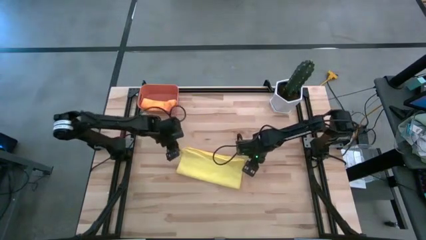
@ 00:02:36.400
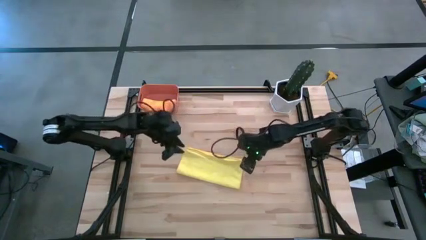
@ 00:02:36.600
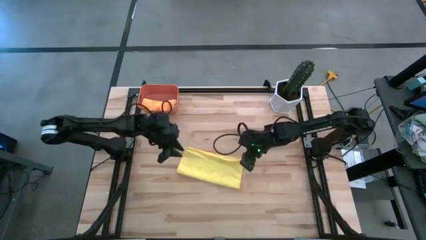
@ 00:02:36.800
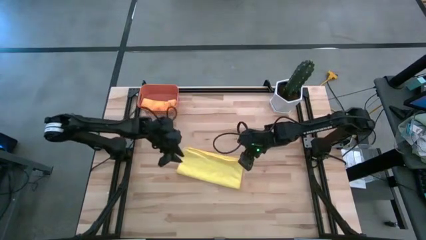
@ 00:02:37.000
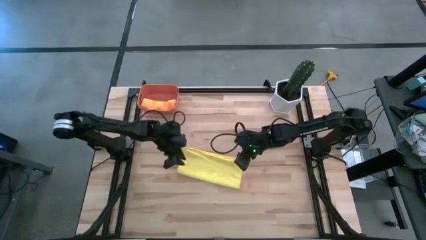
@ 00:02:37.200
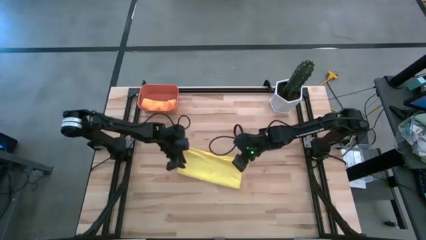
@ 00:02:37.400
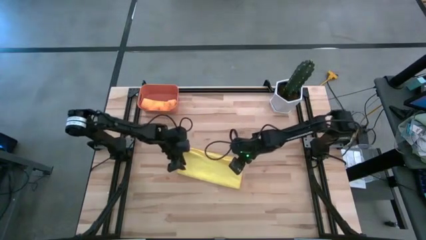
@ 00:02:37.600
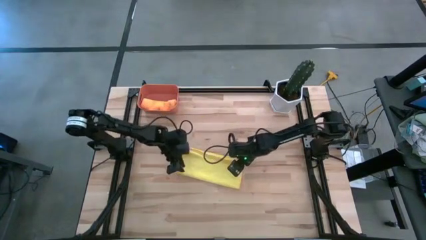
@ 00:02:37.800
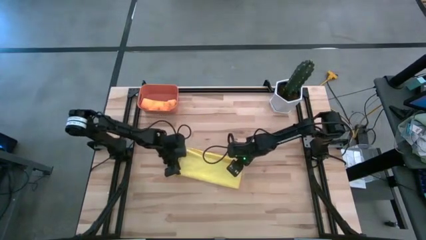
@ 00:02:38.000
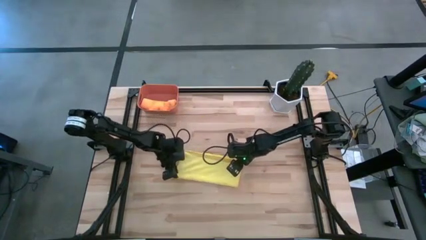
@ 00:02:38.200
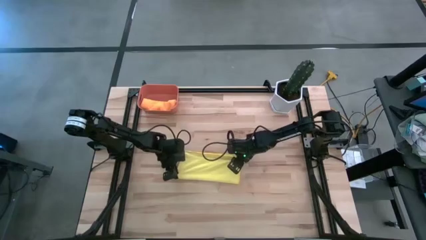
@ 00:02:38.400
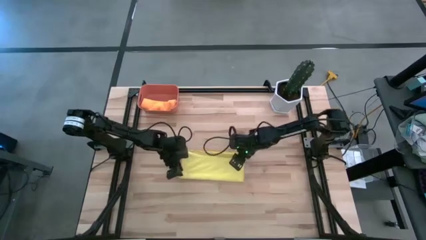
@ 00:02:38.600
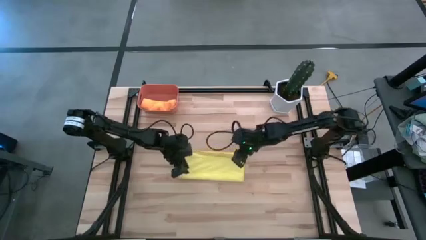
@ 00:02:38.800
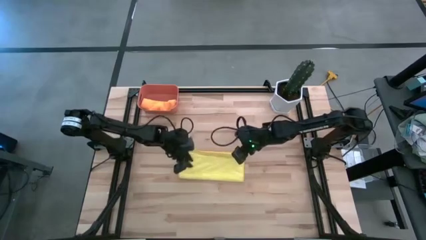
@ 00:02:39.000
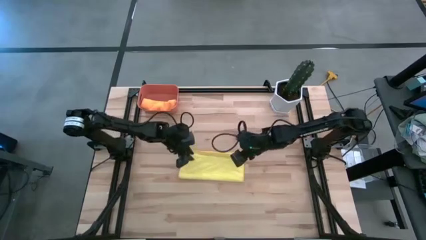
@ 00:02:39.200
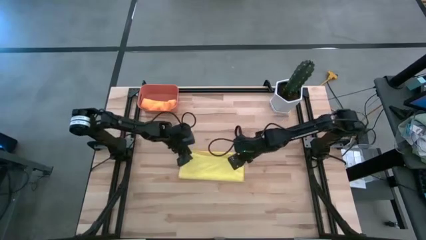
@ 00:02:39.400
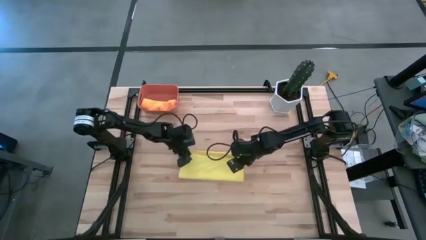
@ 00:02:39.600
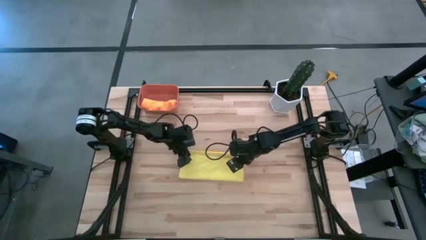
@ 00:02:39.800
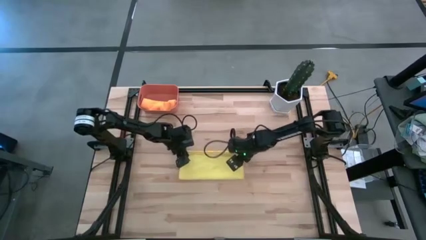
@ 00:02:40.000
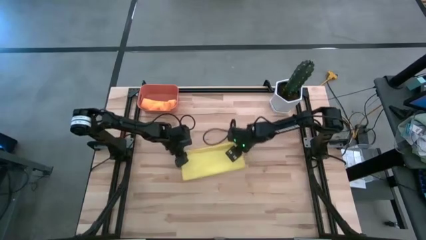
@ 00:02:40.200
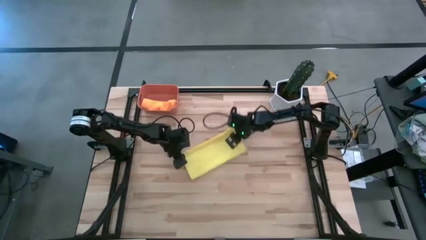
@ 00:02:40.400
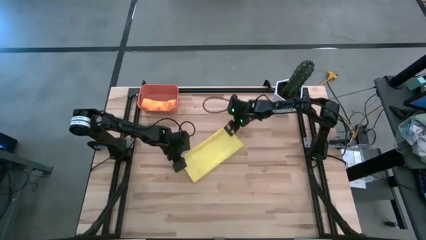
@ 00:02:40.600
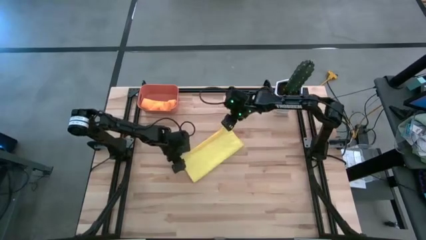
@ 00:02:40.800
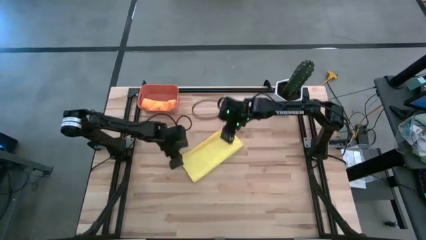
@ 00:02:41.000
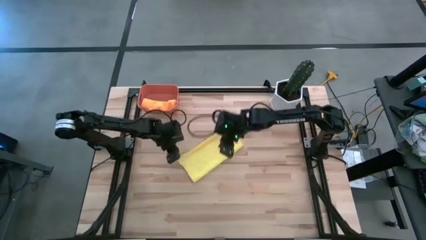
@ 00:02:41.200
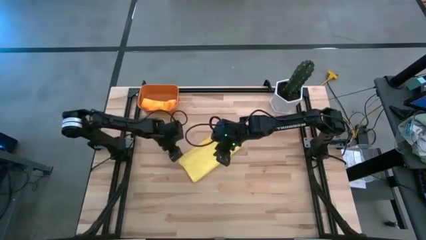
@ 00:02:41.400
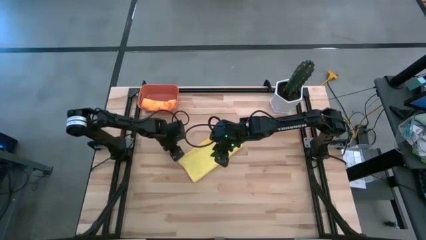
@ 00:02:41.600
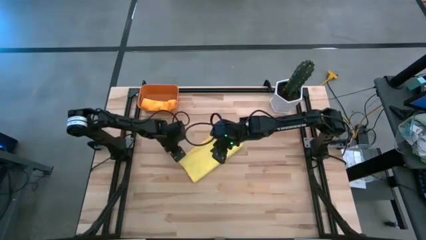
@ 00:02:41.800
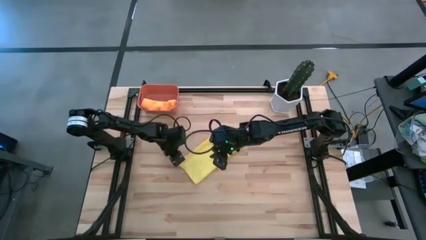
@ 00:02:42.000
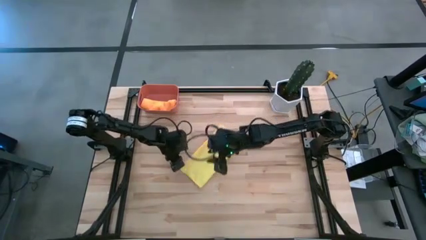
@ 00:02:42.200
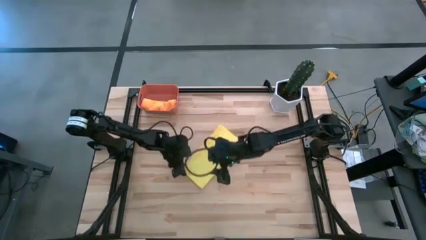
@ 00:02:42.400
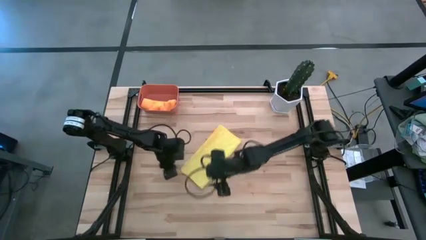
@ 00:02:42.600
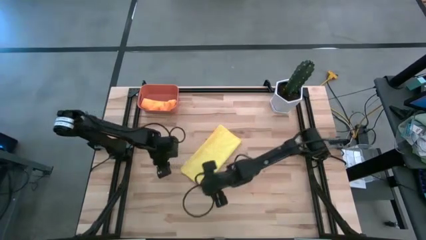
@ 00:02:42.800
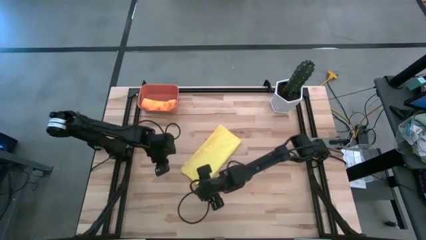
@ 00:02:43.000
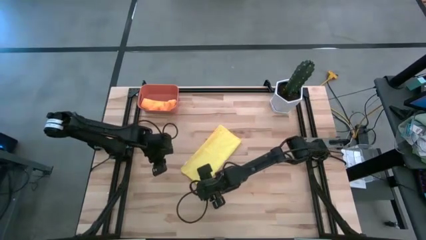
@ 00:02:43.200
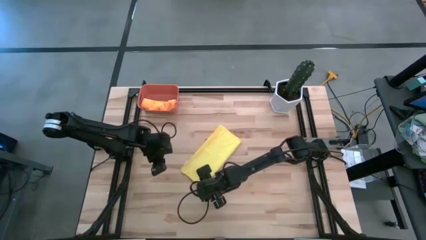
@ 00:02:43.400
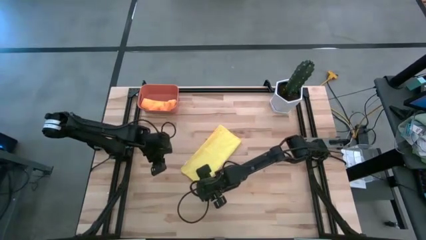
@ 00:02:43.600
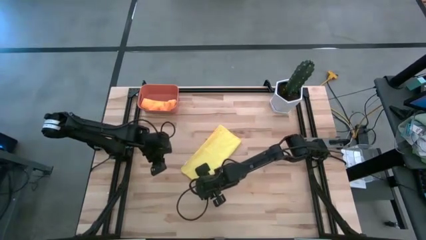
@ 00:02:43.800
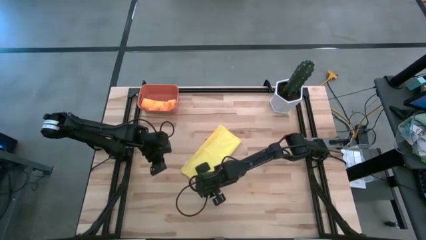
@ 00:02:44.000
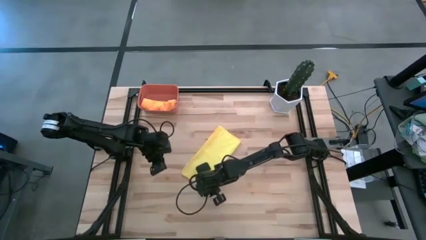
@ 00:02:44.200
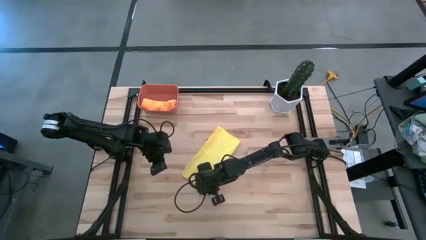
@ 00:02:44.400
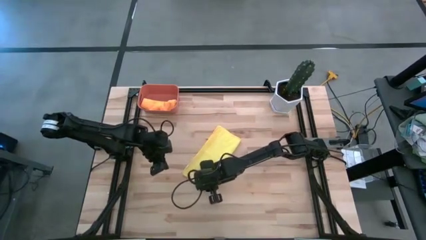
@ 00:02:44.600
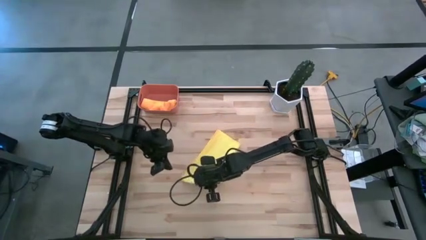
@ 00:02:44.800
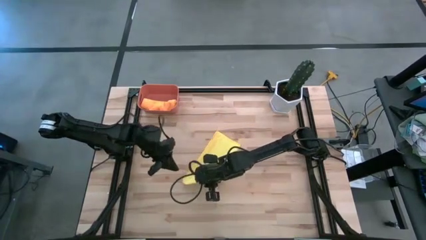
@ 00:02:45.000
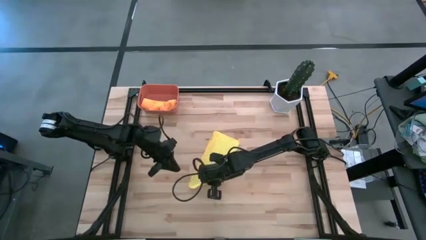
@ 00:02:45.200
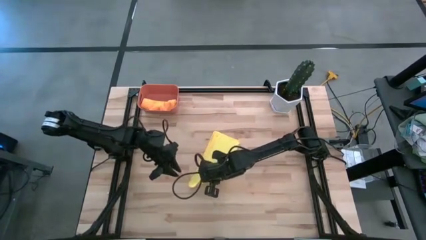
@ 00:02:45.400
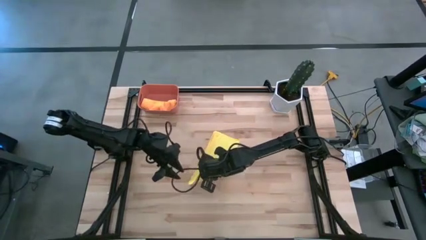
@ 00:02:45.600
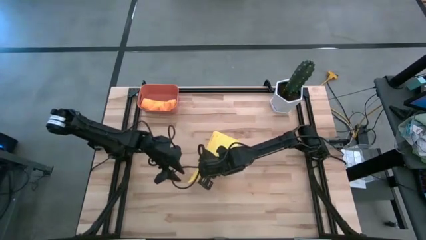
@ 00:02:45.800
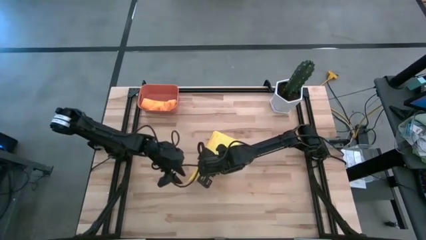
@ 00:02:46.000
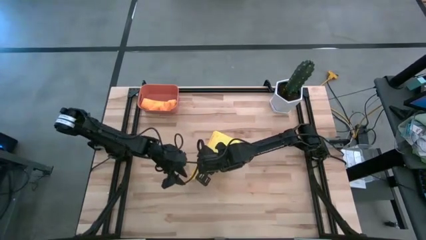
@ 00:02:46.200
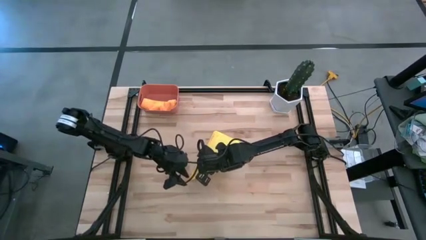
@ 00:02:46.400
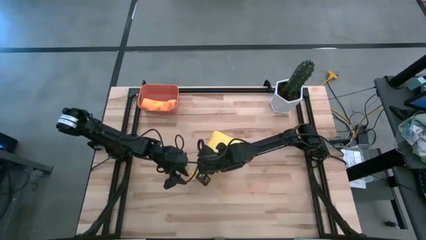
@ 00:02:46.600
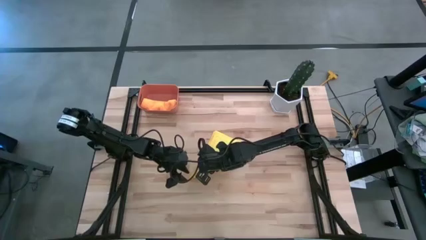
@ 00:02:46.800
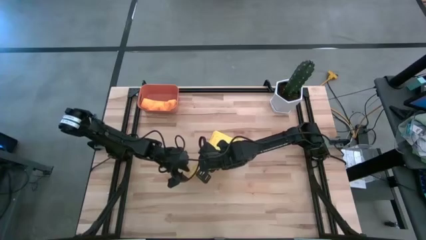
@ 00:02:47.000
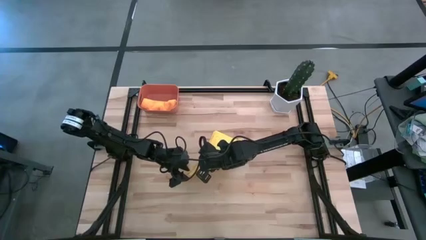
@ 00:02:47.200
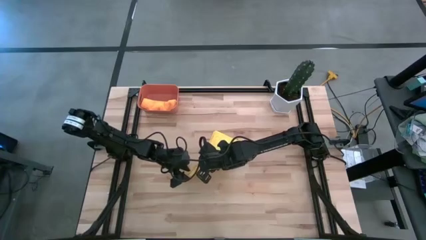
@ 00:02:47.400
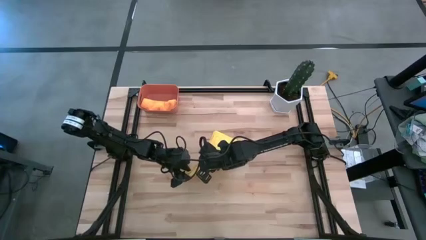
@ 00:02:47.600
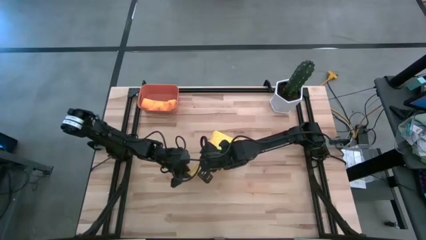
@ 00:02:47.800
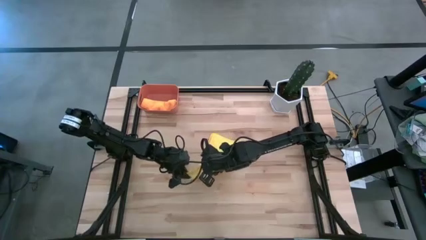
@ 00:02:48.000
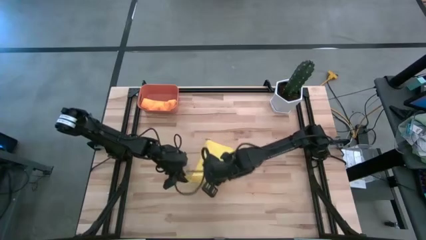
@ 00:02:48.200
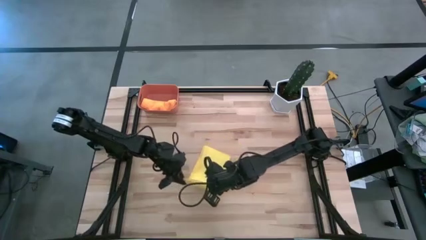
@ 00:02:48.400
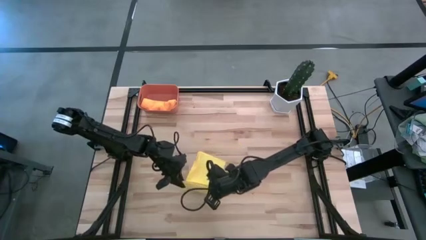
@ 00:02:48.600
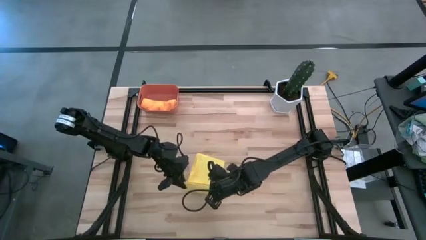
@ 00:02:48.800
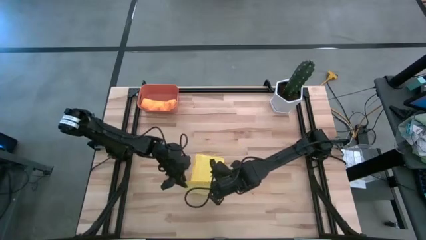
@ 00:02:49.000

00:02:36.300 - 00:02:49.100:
Task: Roll microfiber towels into tight, uniform cylinder then place into a basket
Roll the yellow towel
